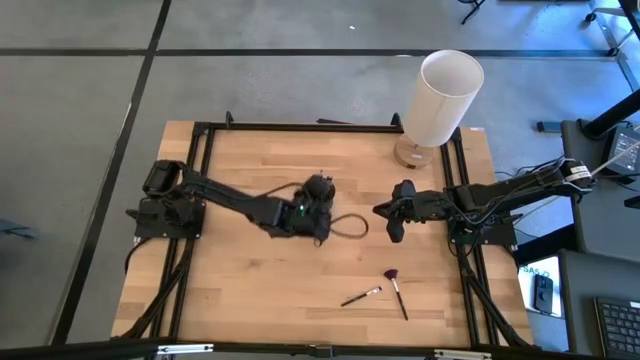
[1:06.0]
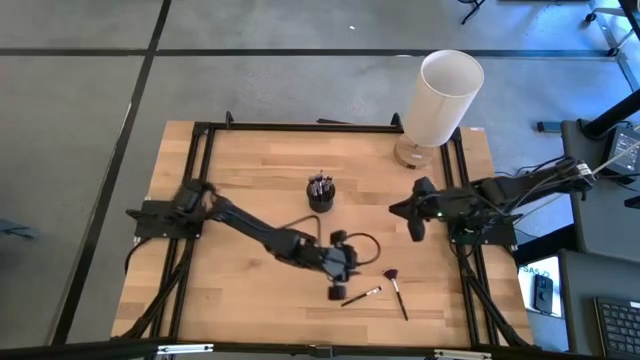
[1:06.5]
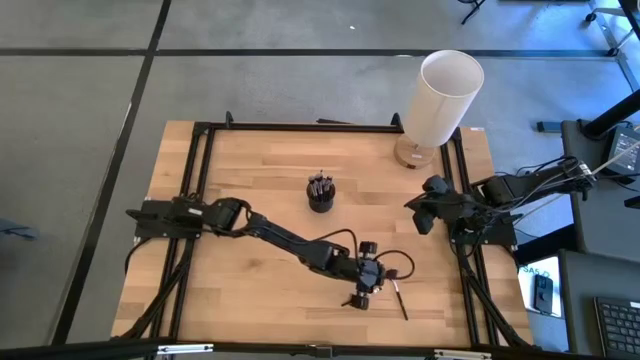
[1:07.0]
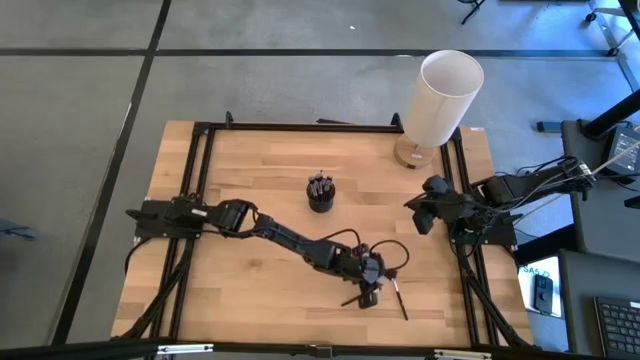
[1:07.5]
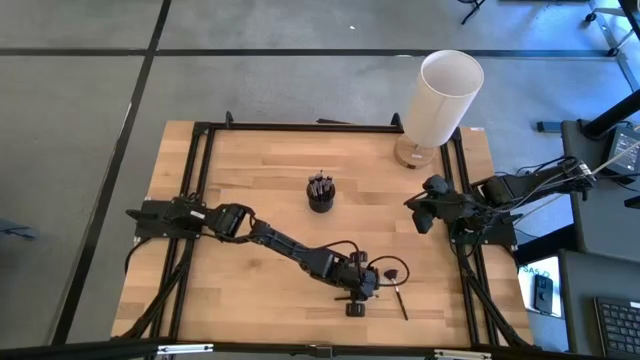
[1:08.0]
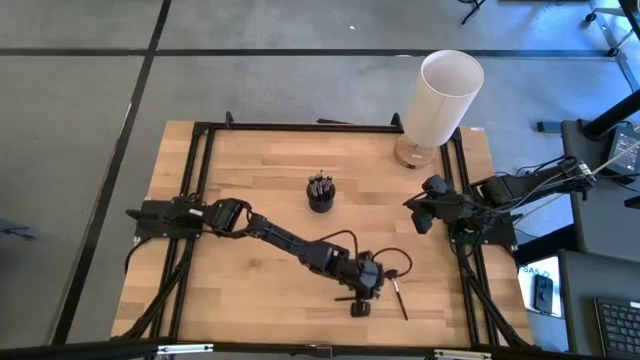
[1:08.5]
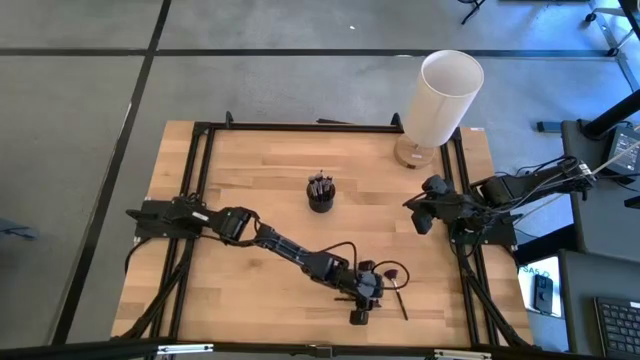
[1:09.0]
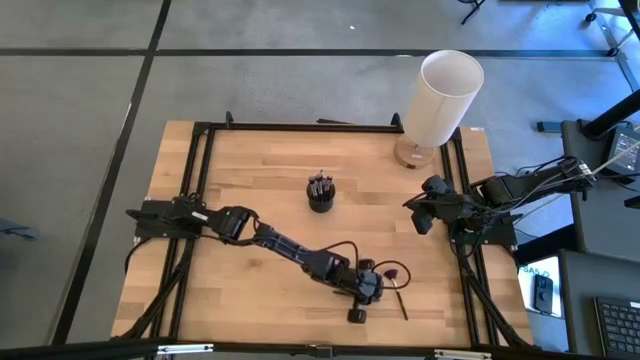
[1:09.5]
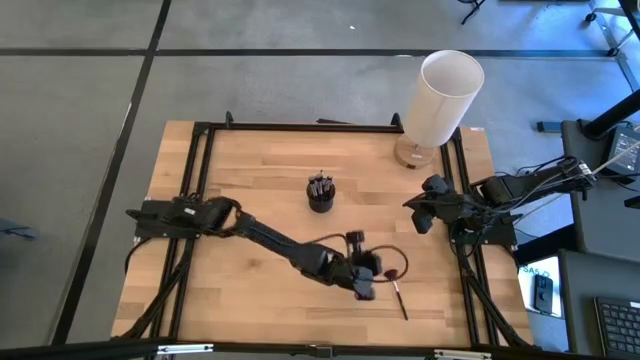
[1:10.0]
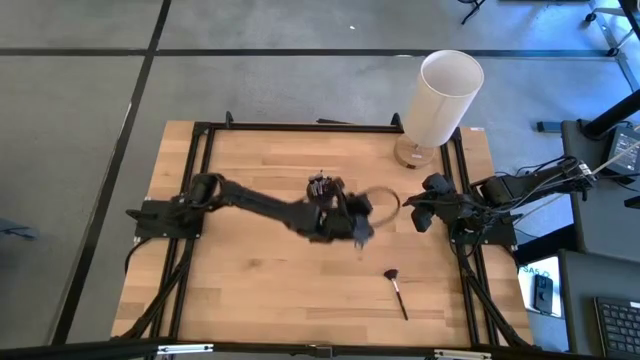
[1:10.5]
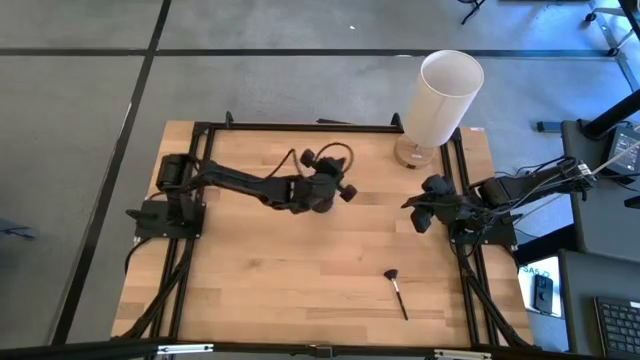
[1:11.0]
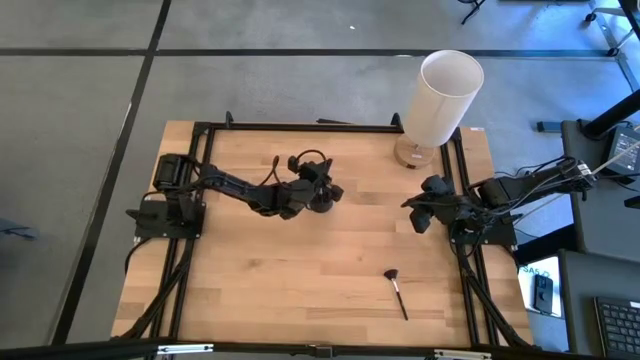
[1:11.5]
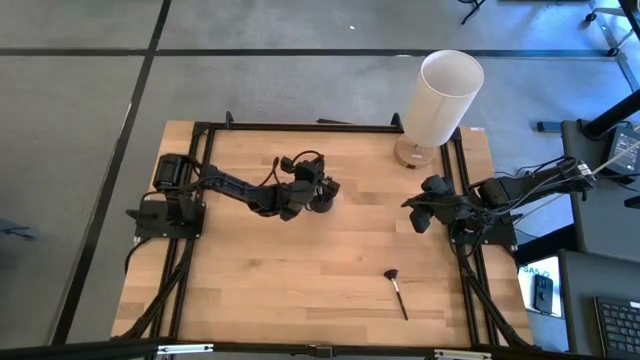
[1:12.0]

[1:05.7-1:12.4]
Task: Sort items
Put the eyeshadow brush into the organizer

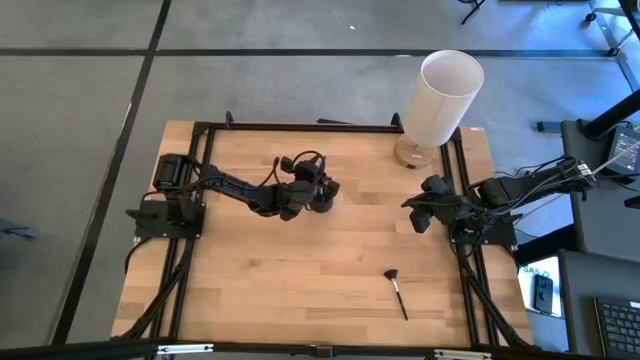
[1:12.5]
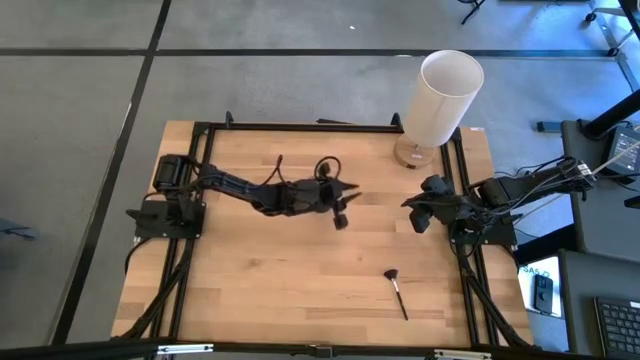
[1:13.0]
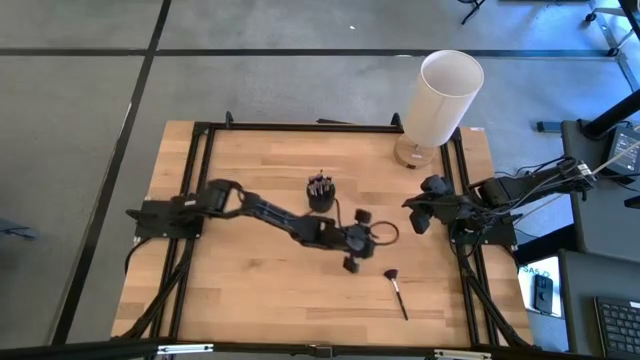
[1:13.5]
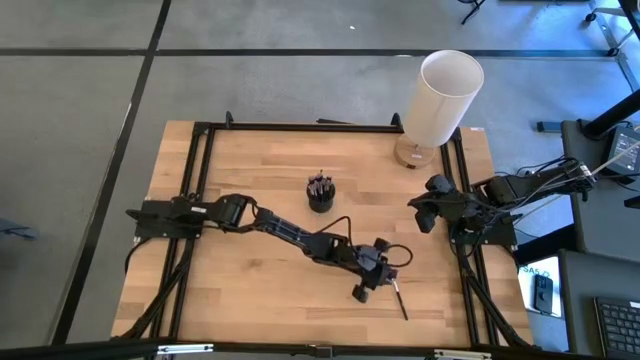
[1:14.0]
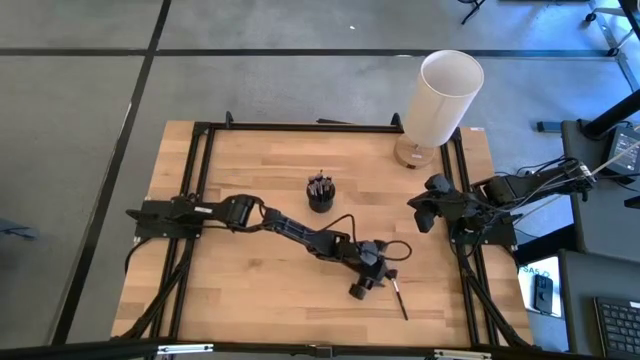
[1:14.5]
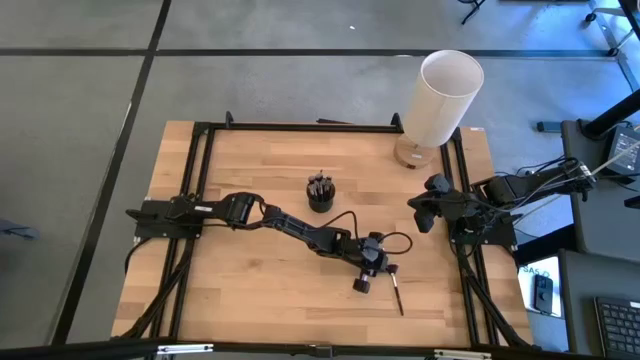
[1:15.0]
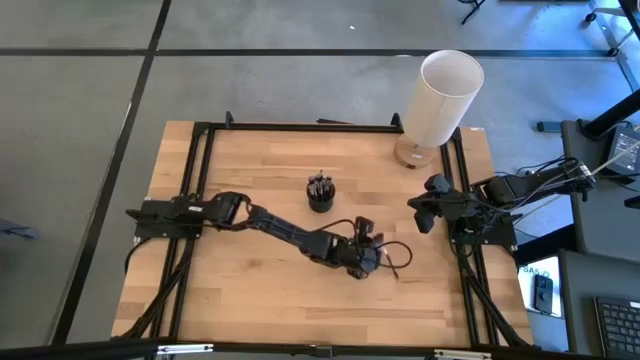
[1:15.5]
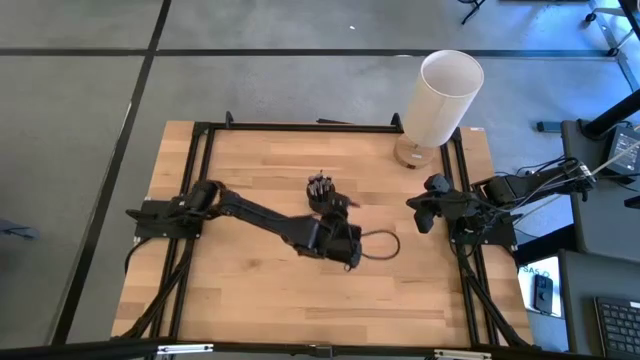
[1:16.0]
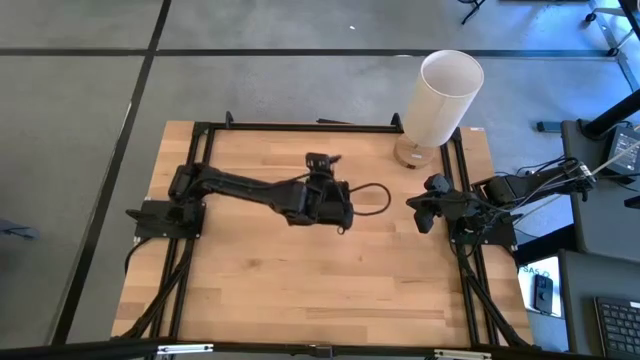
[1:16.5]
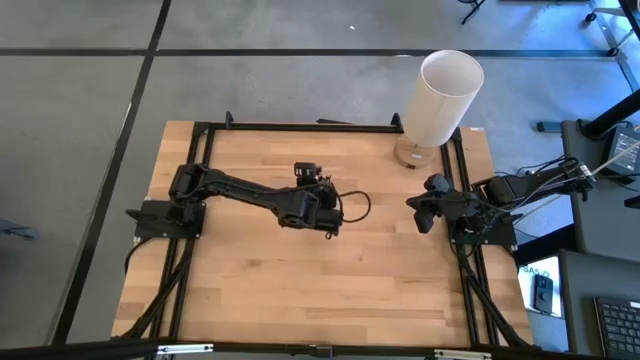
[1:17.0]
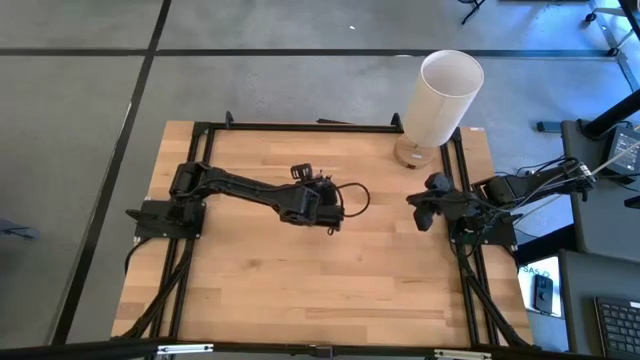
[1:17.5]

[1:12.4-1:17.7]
Put the highlighter brush into the organizer

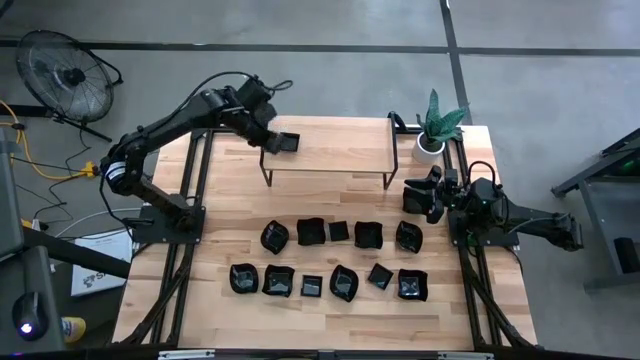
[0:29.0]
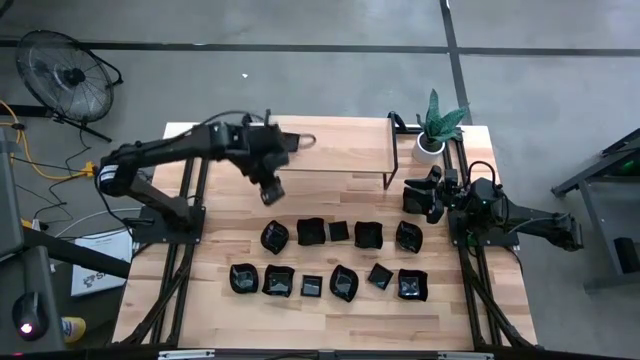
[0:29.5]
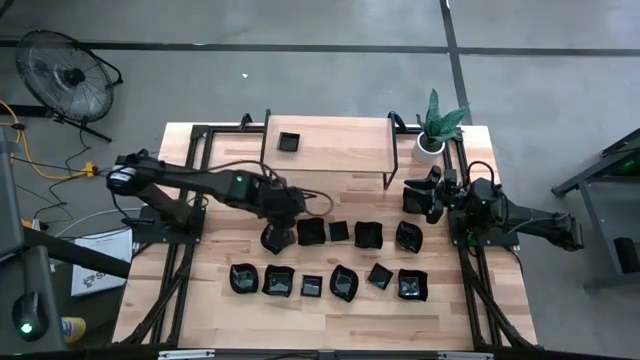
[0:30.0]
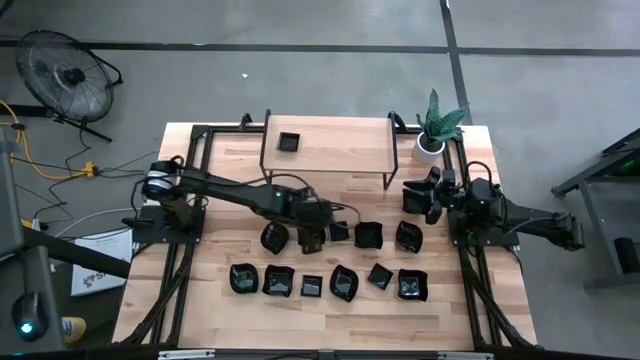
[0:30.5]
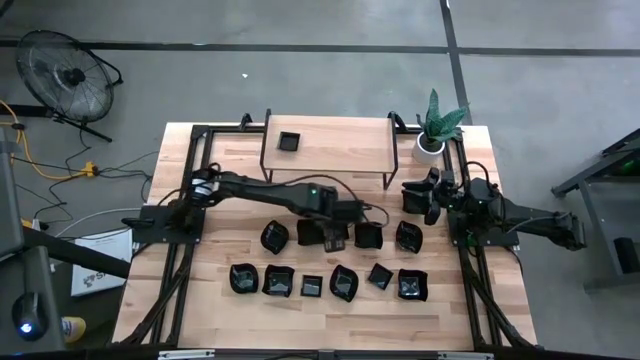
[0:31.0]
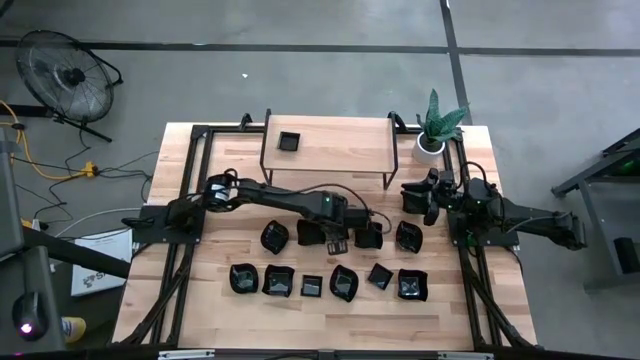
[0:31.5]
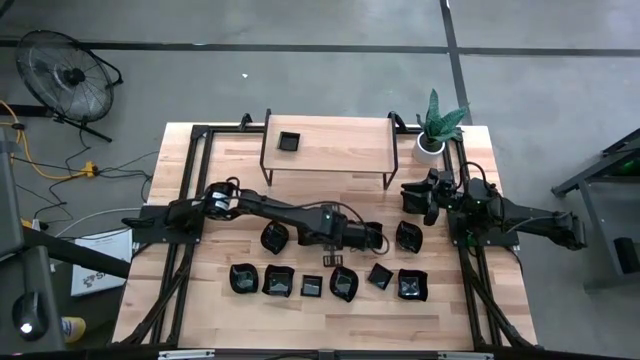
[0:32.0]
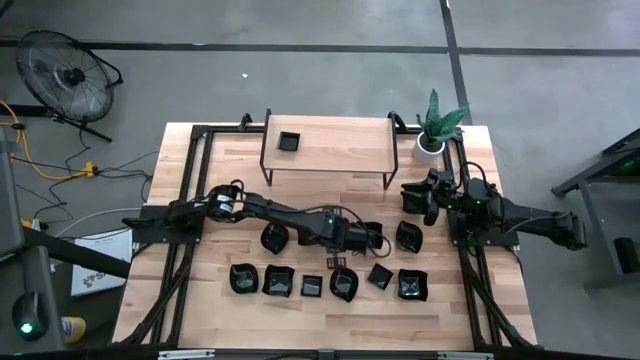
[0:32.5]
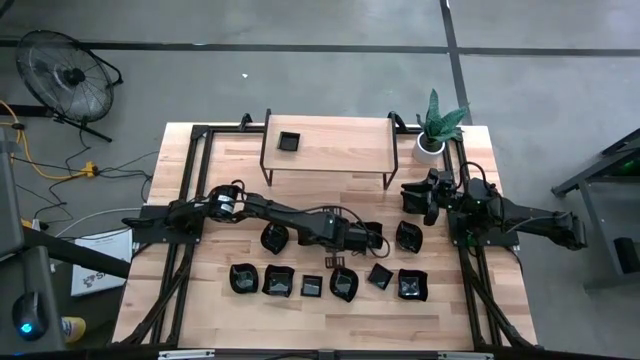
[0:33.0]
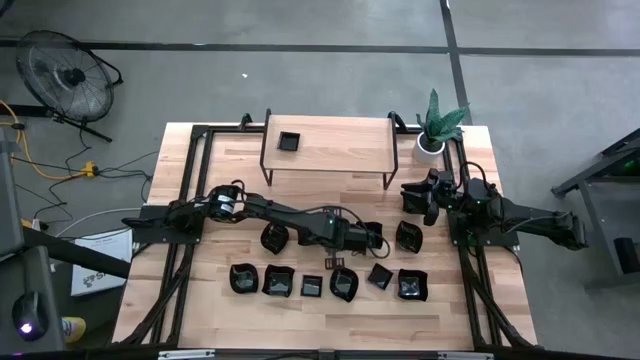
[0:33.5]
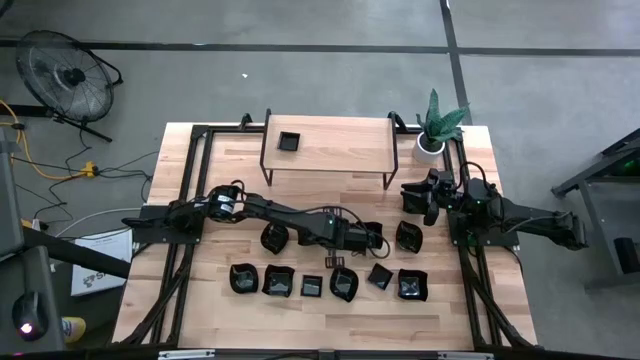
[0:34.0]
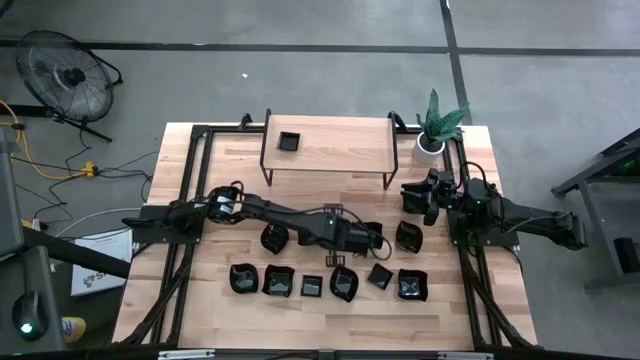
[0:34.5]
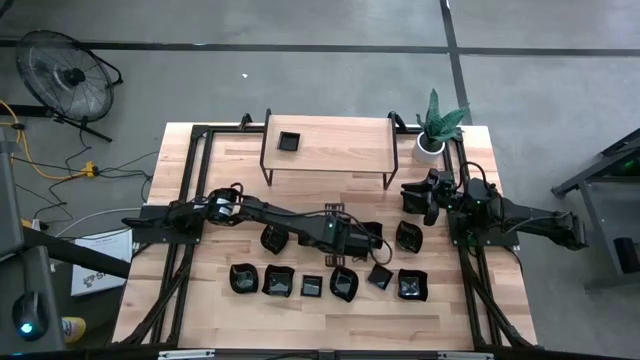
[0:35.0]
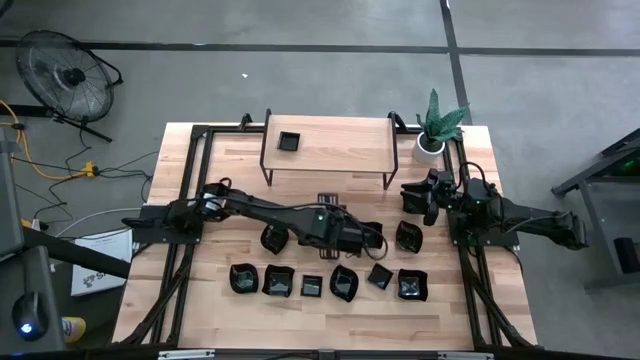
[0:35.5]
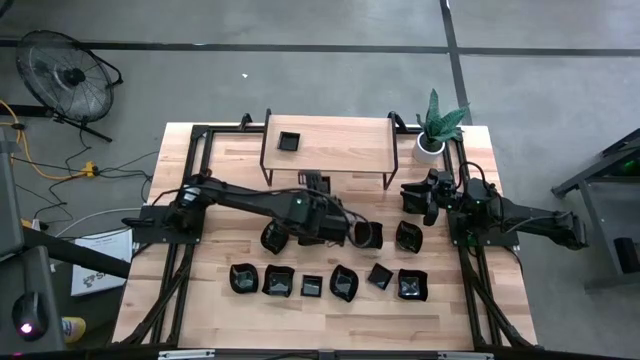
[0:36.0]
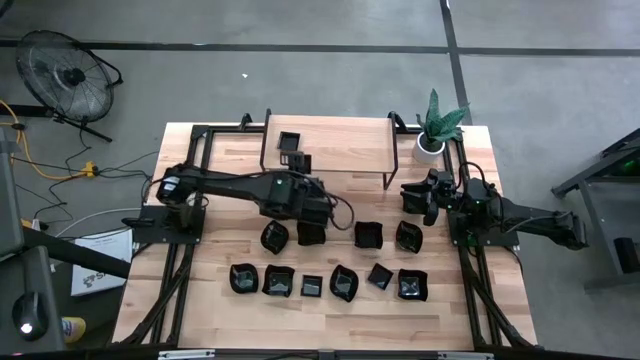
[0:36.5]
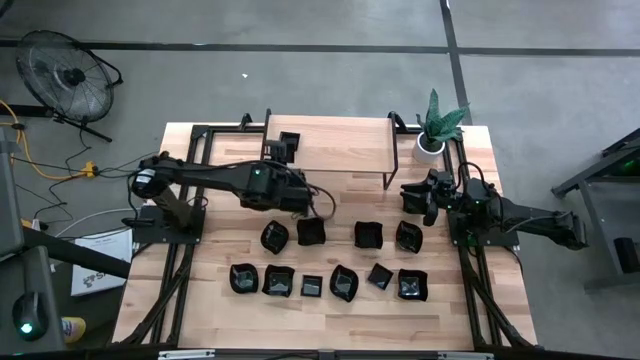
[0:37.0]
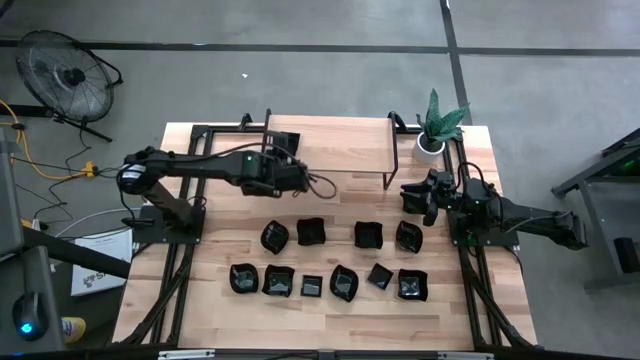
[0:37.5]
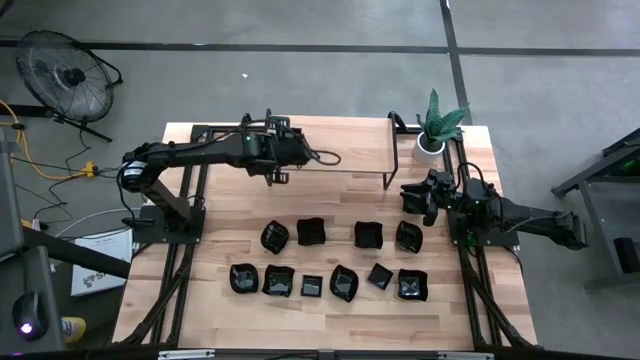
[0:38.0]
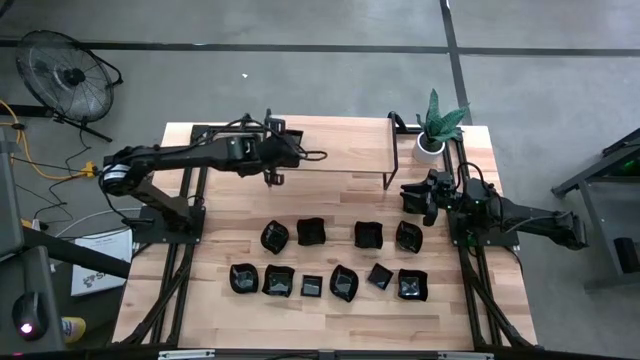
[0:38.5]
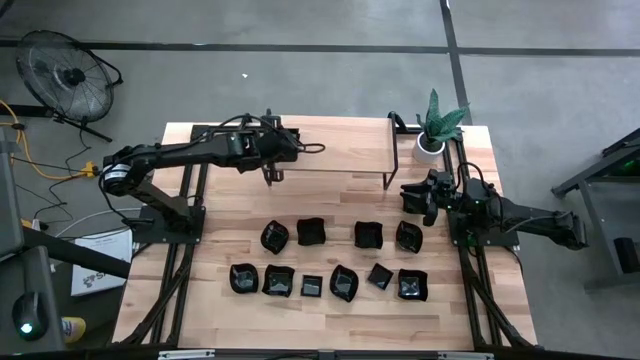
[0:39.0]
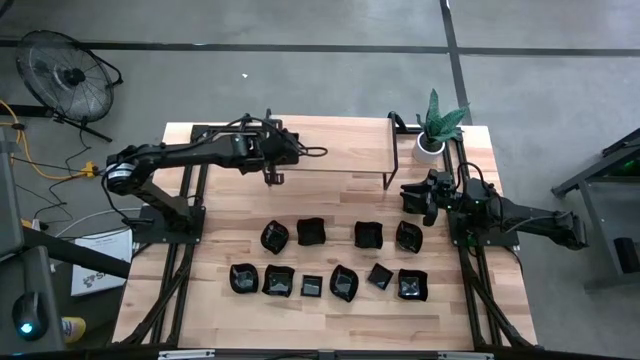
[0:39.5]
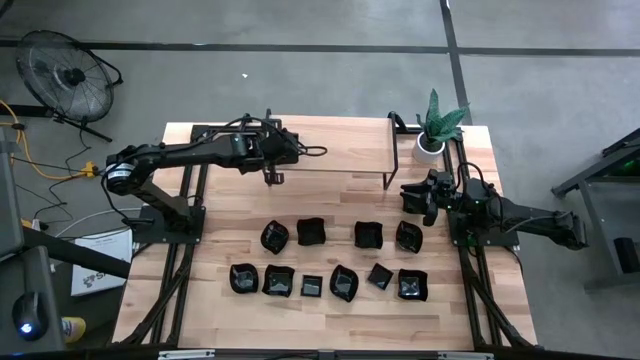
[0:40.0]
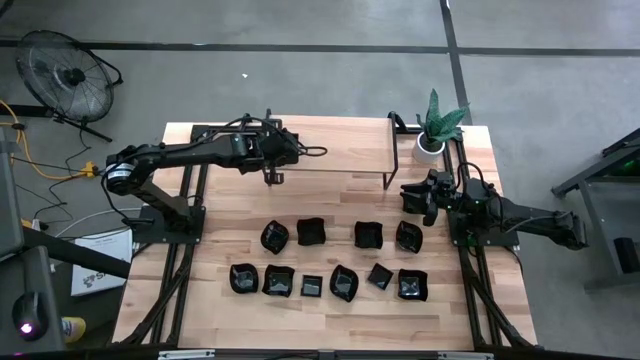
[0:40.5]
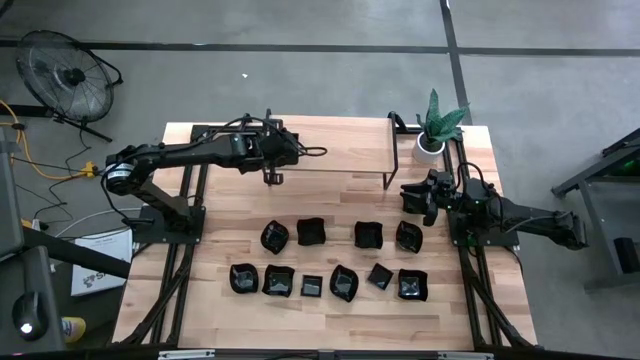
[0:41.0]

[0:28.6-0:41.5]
Task: Pick & Place Mini shaped plates
Stack the black square plate on top of the stacked black square plates on the shelf
